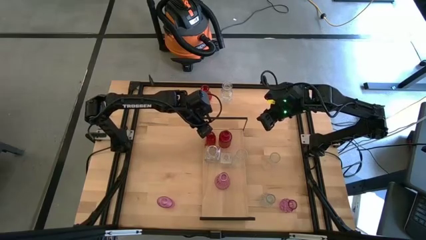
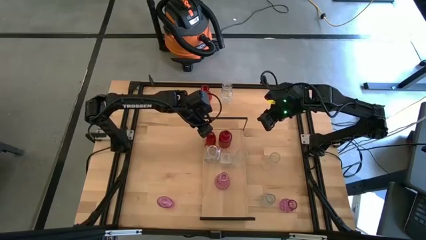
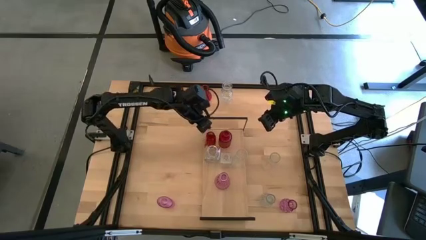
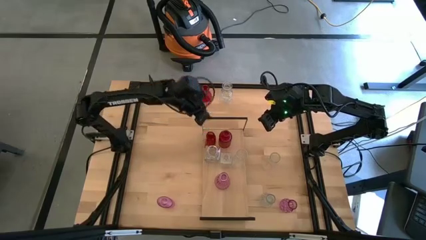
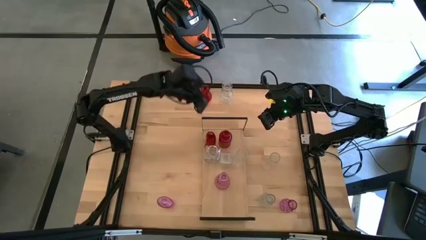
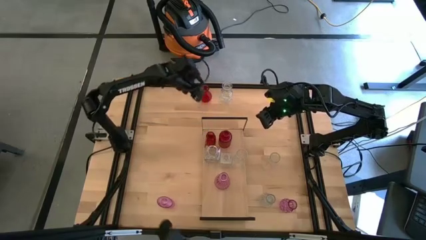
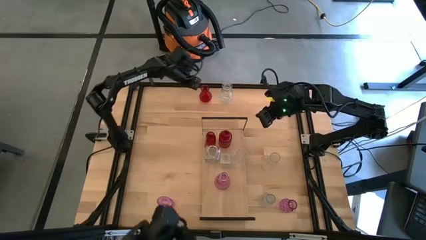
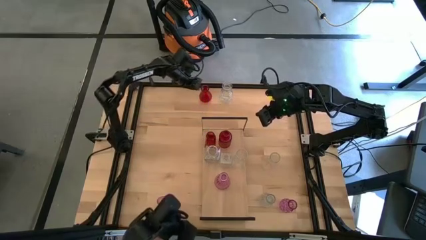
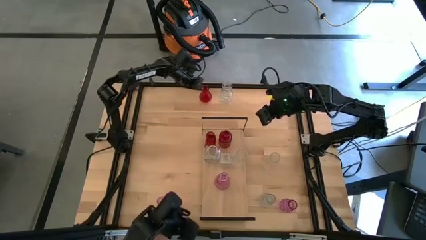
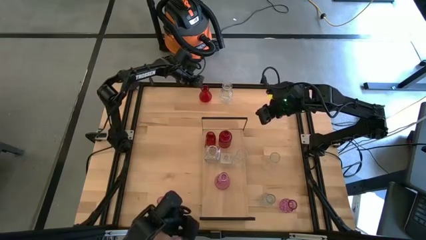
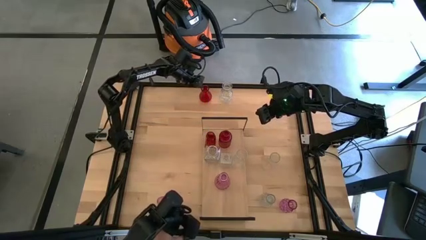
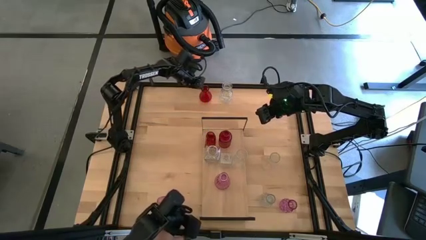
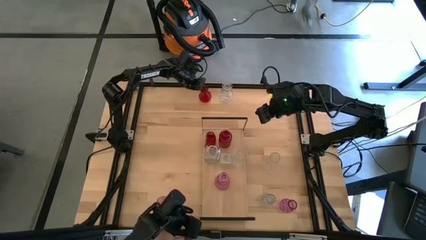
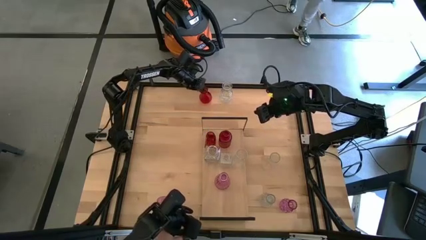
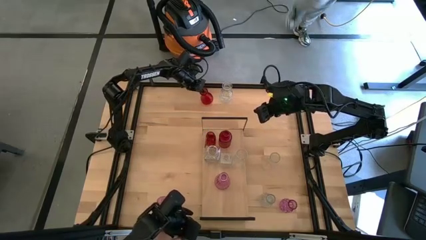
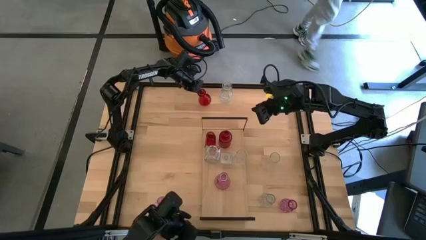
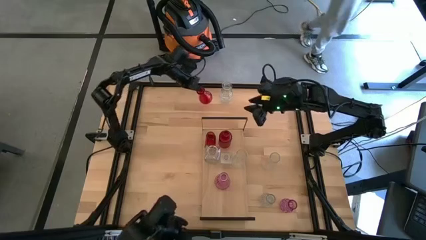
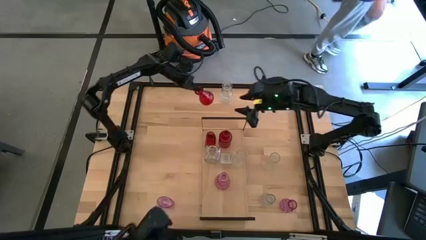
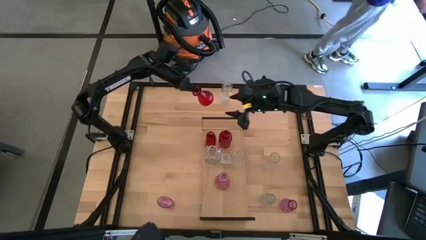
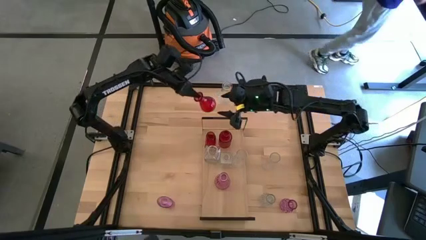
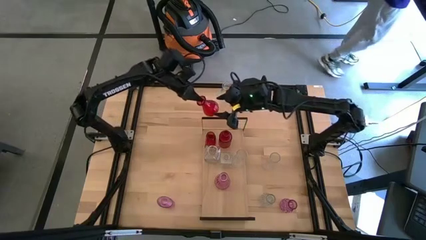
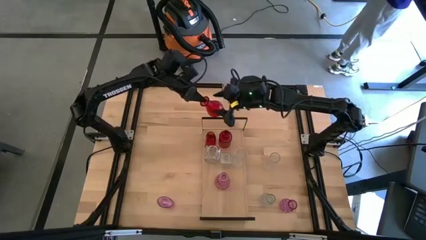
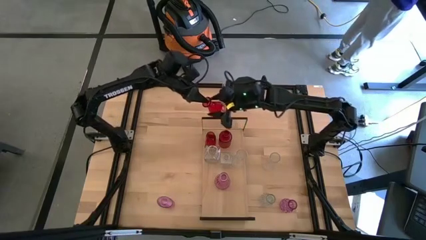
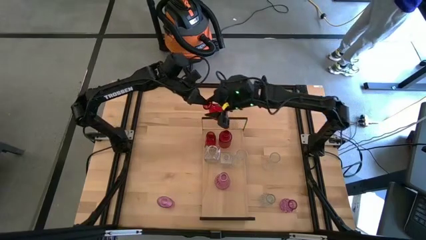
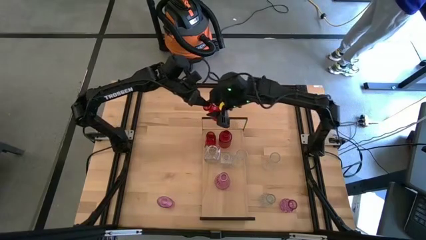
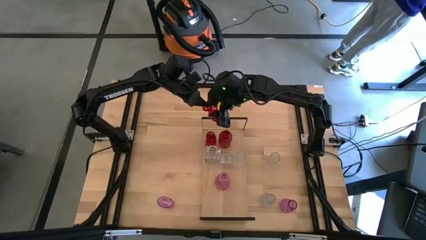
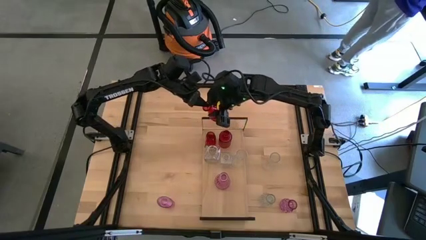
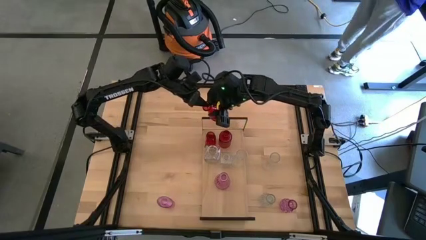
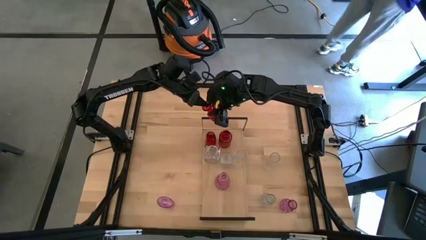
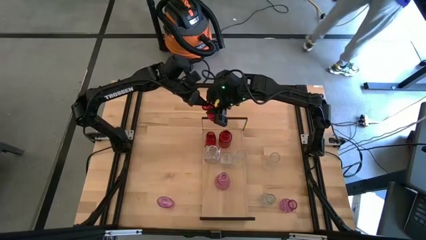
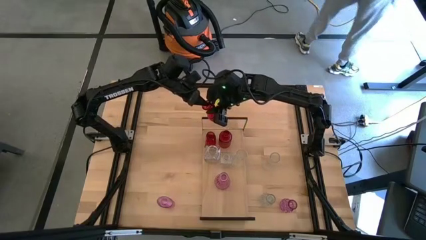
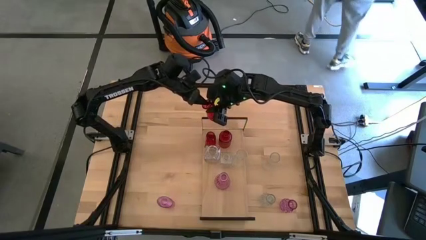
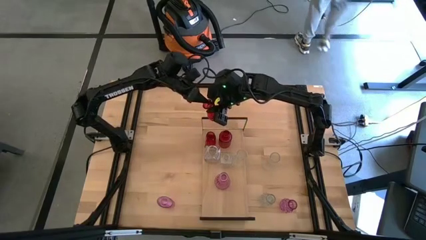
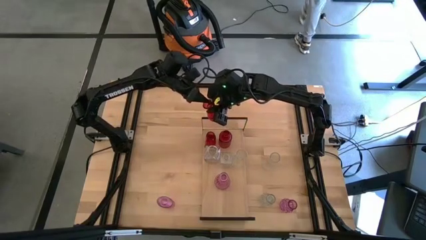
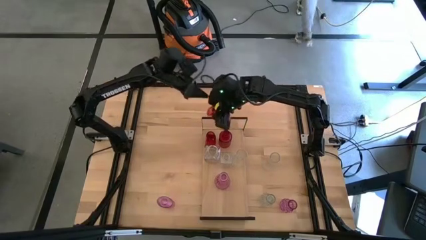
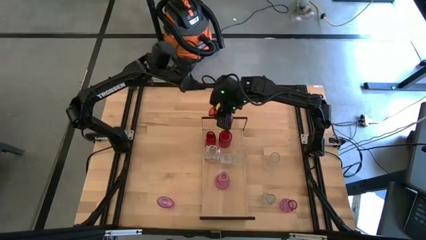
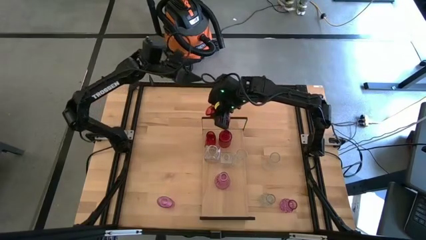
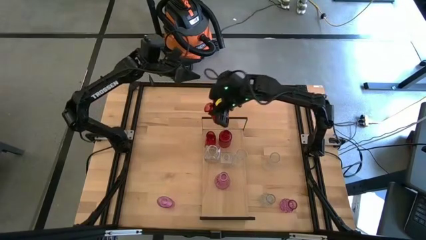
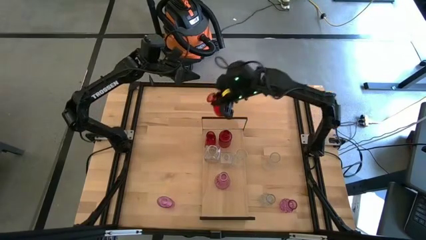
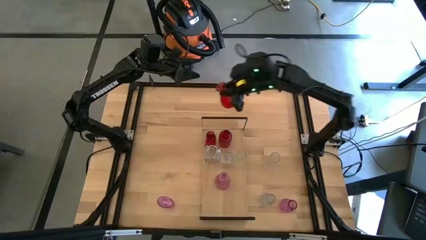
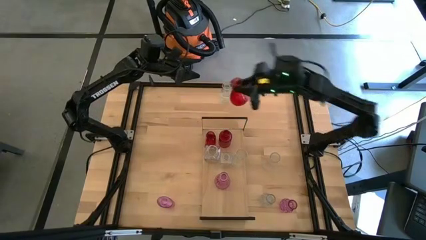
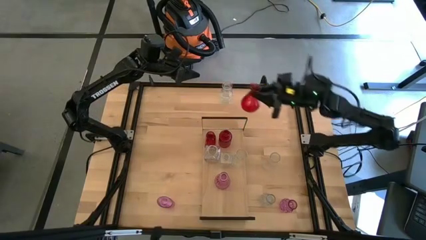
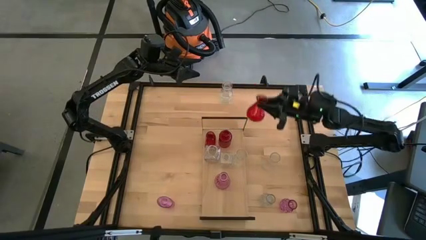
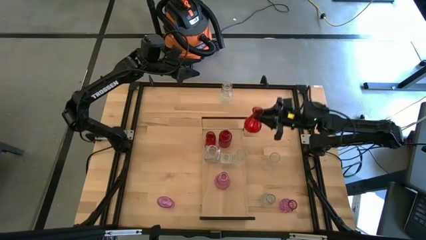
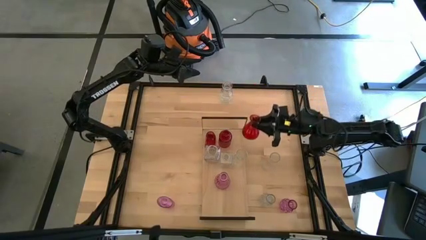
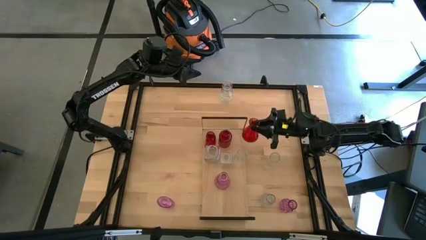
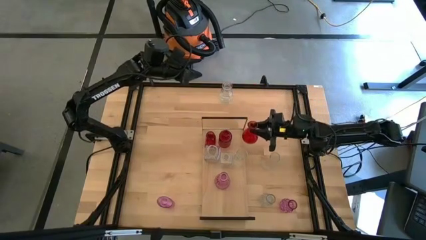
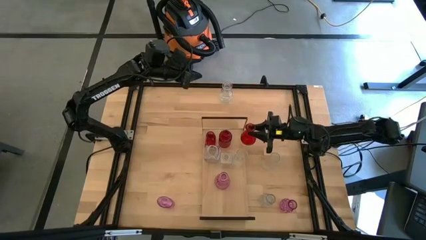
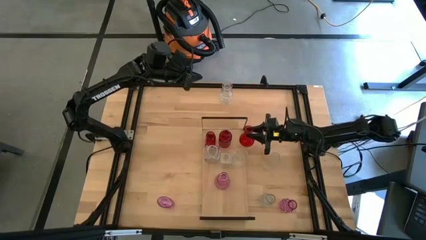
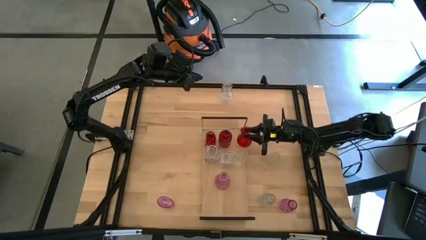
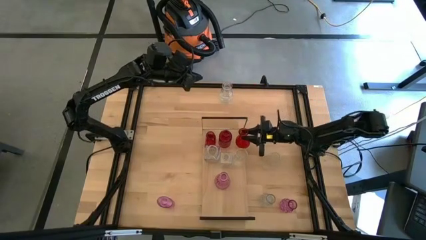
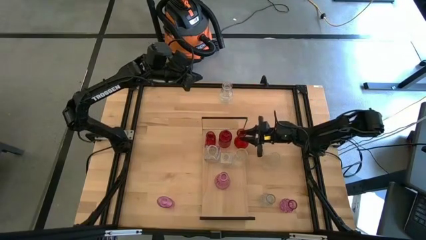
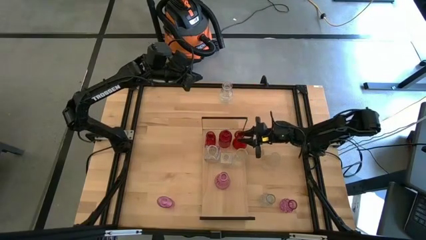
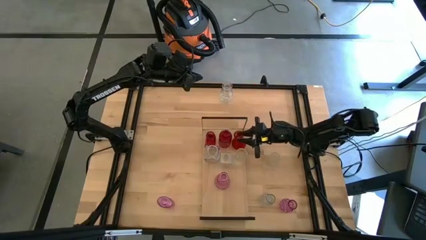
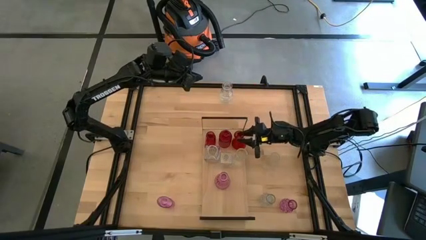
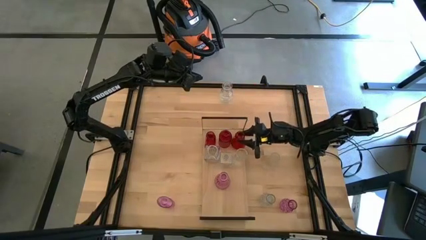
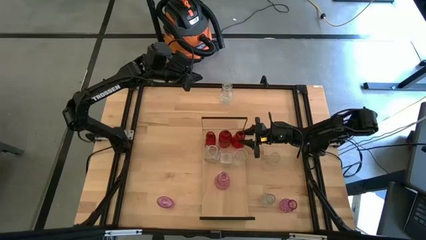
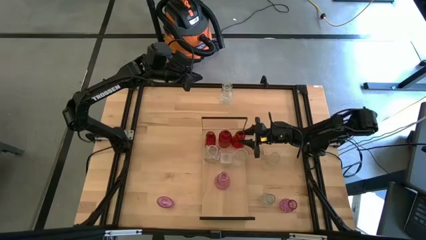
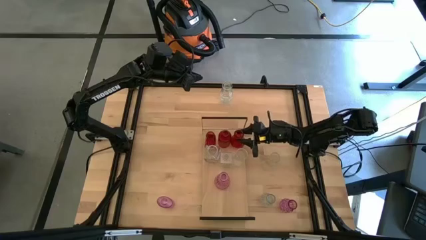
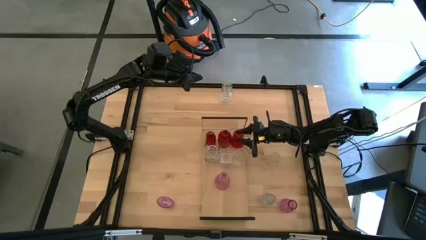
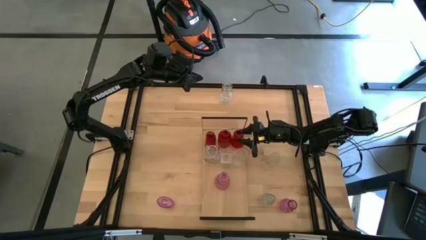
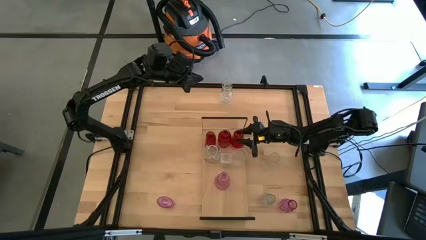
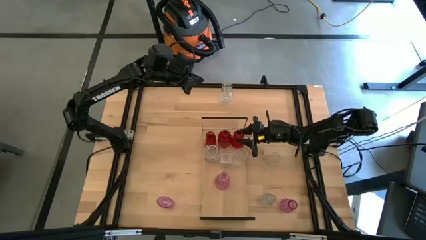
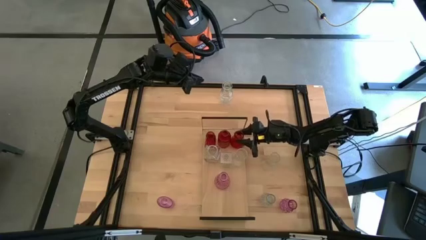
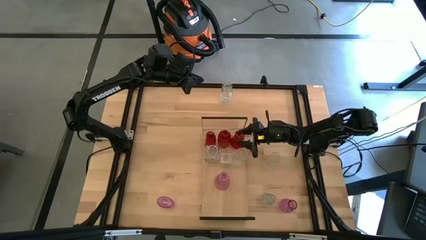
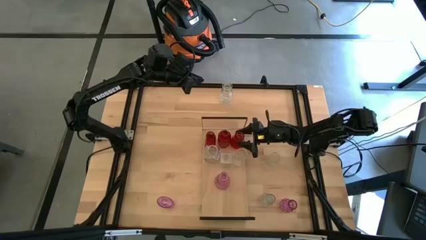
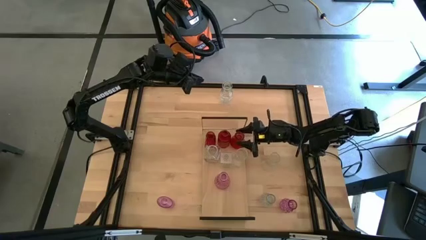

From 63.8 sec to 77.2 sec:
Task: sort vases onto shelf
Put the red vase on the shelf aligned with the other red vases

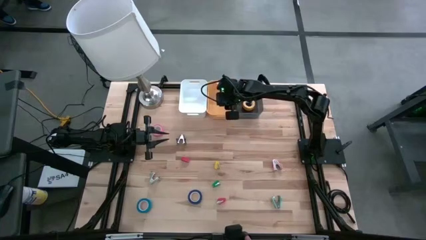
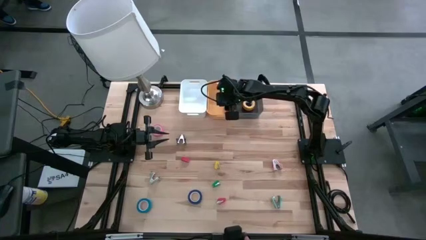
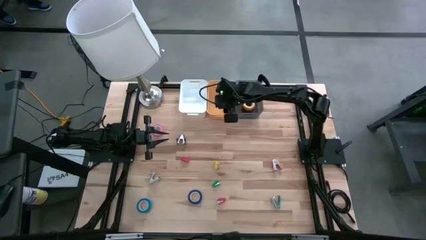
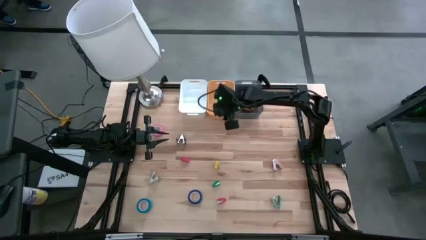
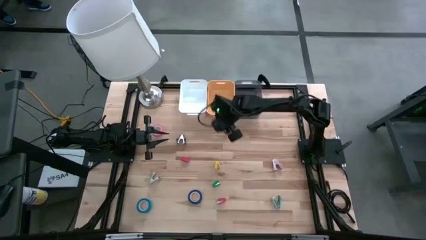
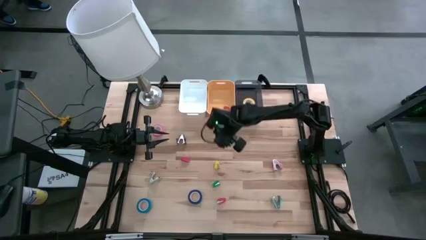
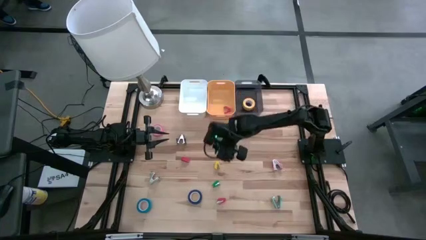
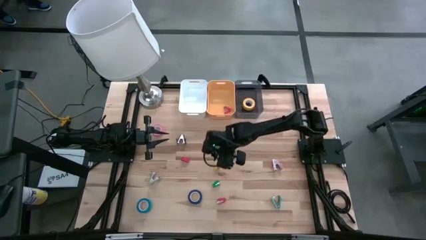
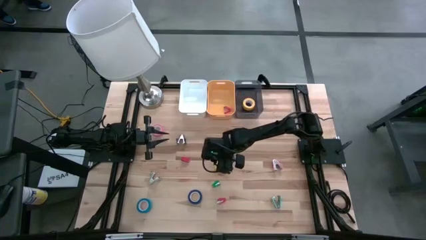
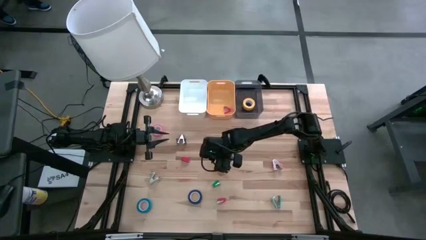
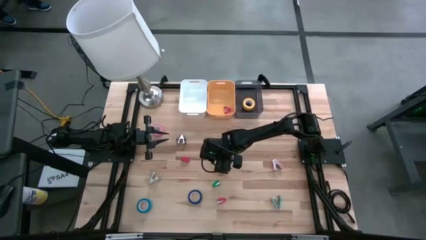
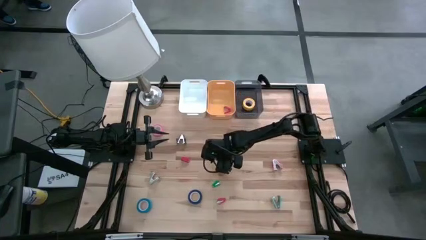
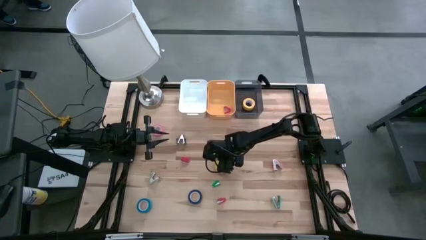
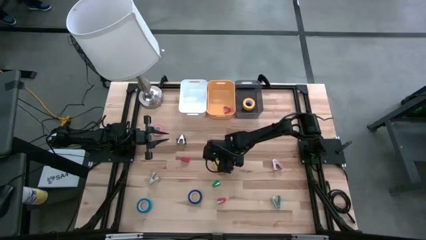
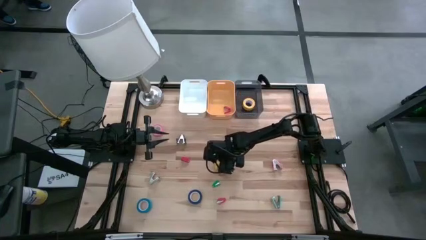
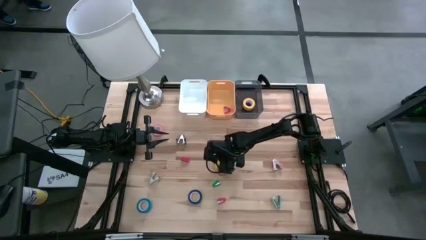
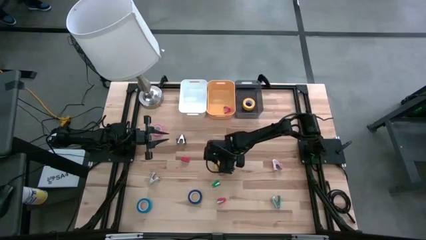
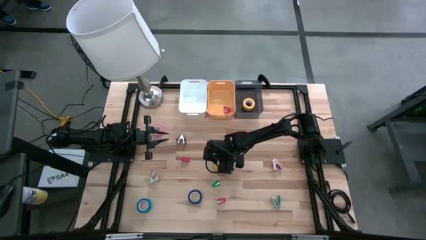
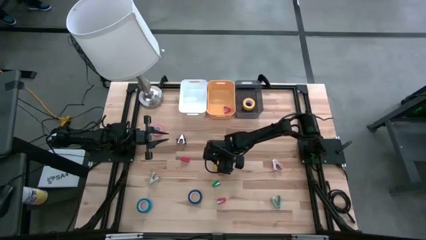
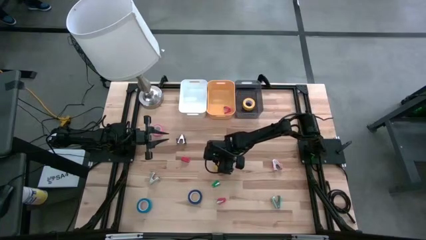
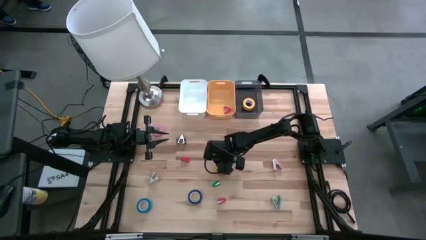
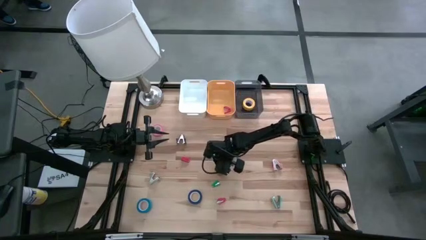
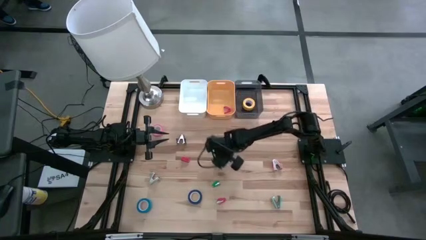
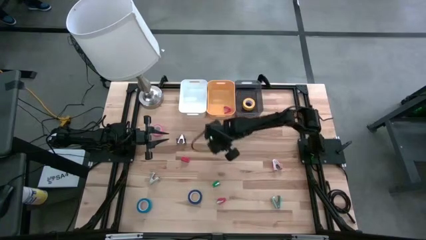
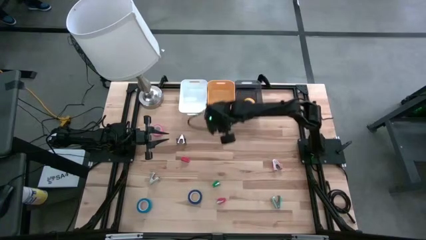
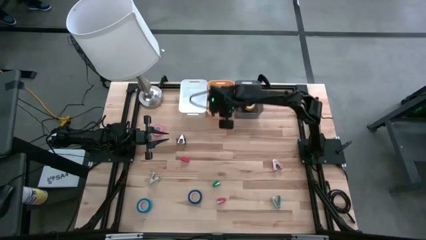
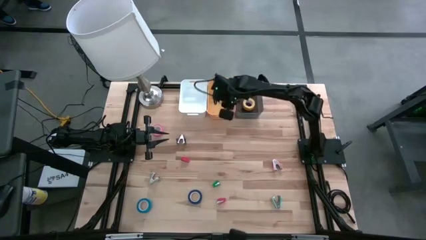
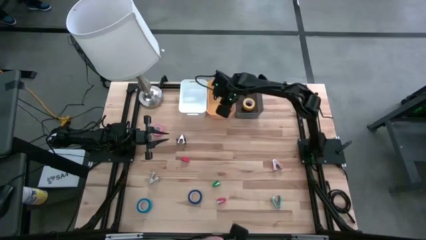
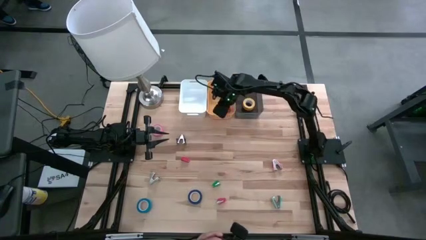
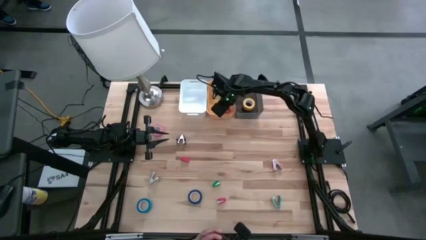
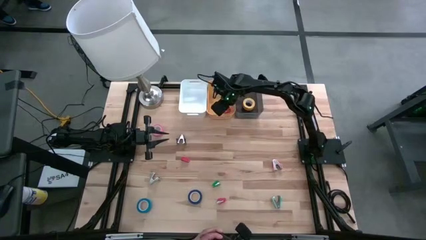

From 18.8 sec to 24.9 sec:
Task: Pick and place Stapler, Stapler remover, tape
Put the yellow stapler into the yellow bin
